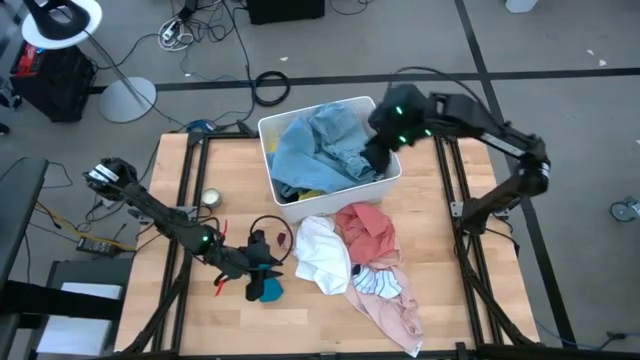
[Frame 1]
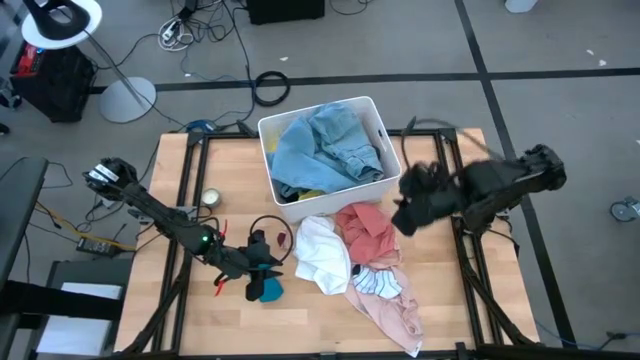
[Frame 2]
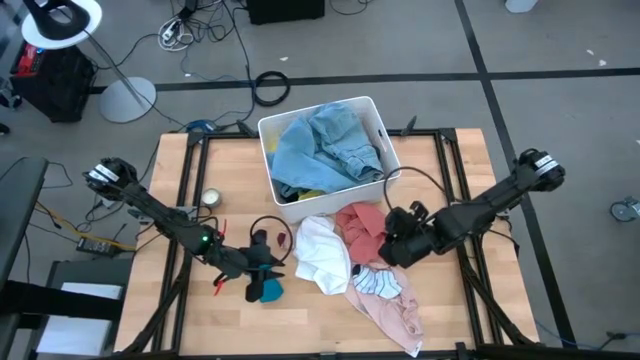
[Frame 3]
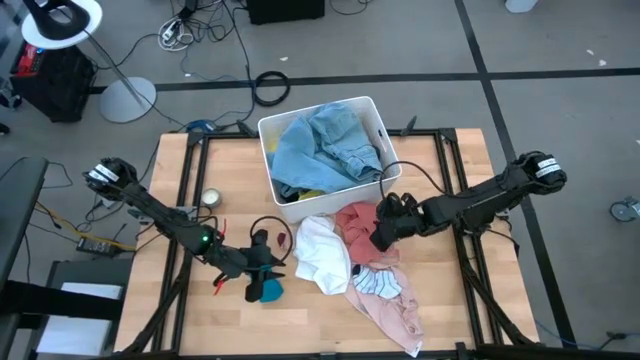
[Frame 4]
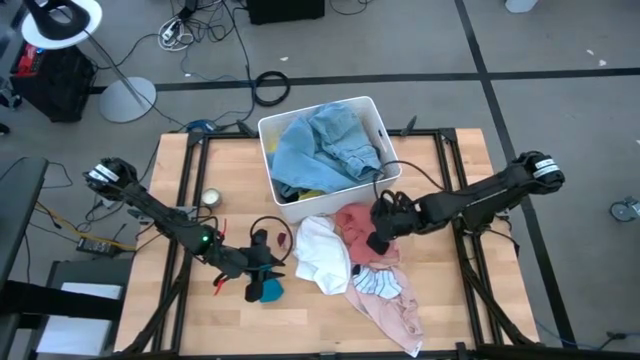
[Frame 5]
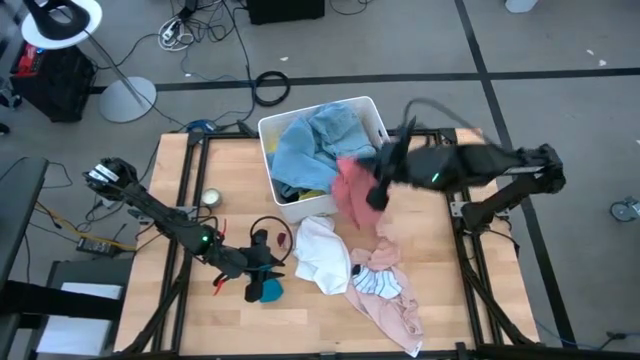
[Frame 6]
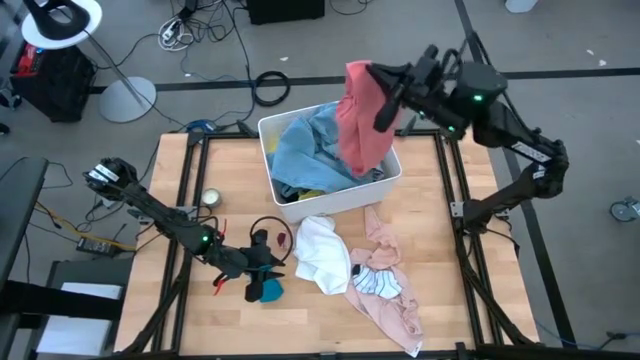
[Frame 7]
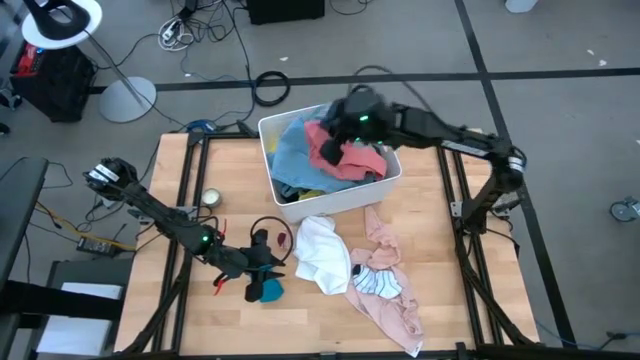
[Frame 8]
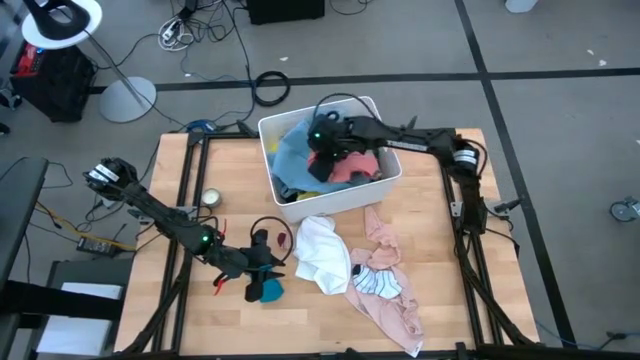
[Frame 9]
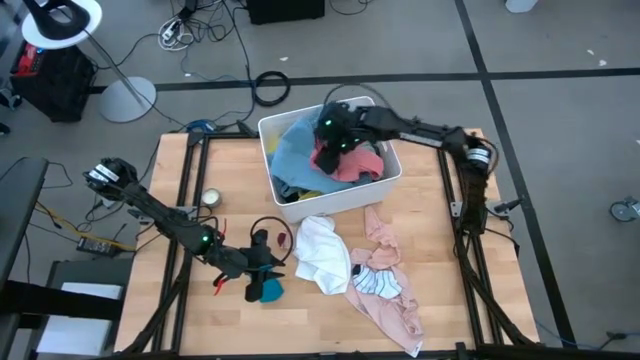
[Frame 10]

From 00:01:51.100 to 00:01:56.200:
Task: Sort clothes
Put the orange underwear into the white bin

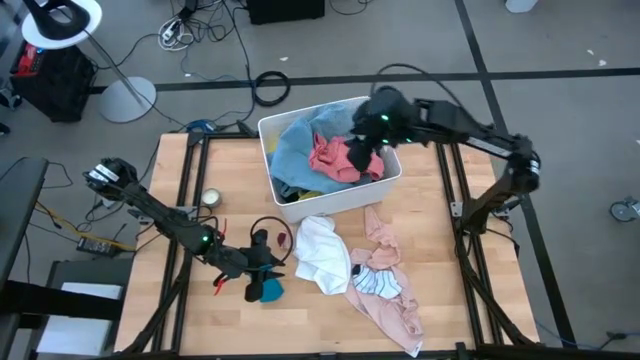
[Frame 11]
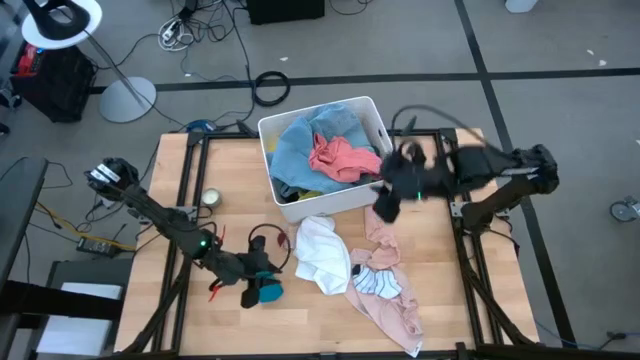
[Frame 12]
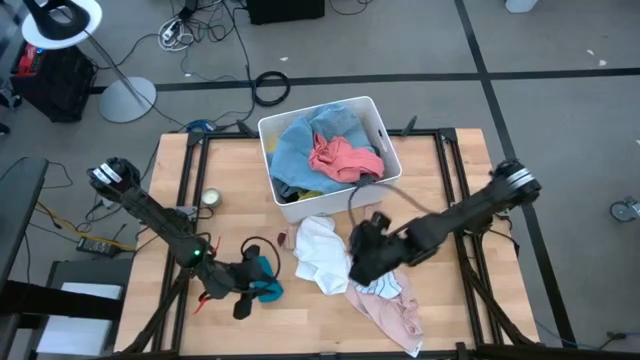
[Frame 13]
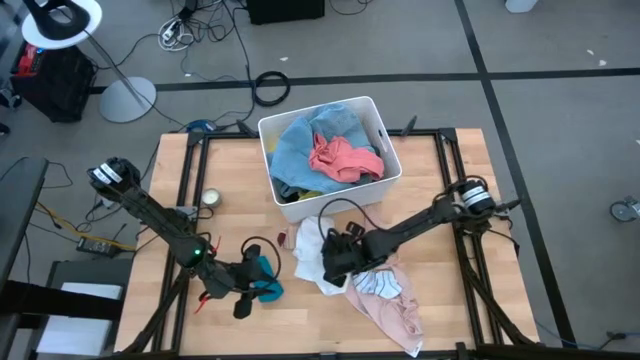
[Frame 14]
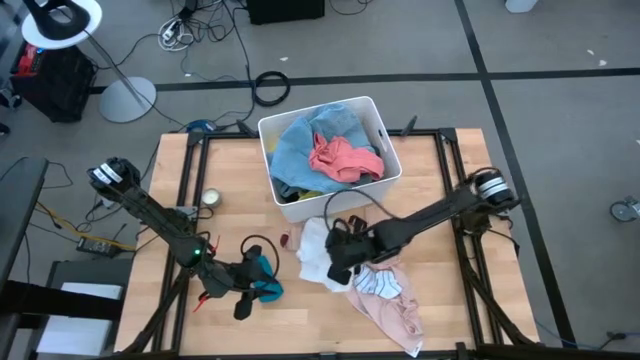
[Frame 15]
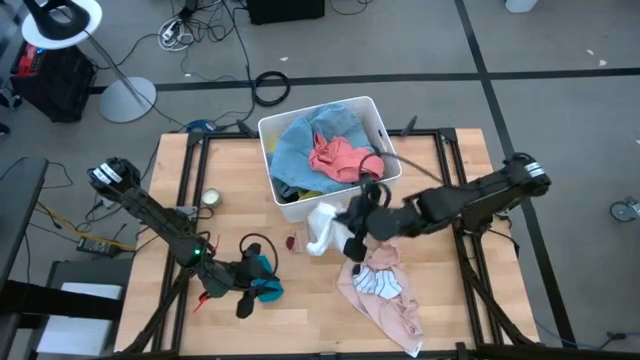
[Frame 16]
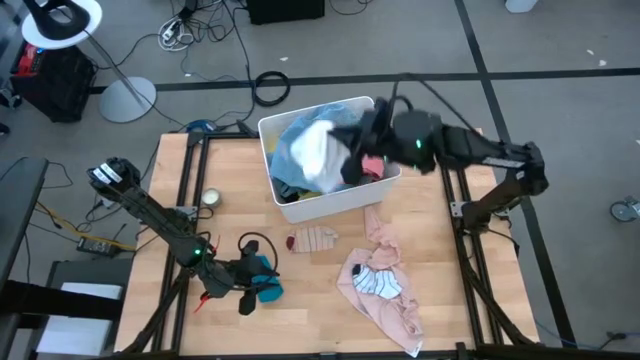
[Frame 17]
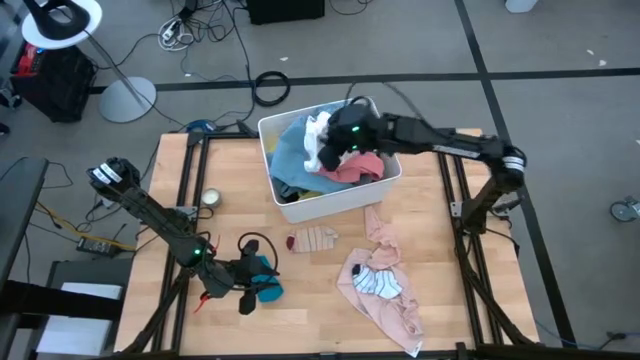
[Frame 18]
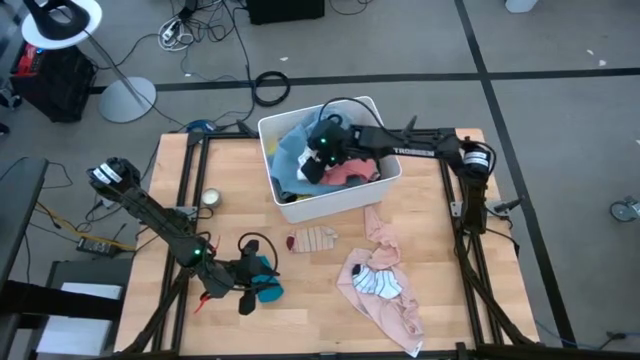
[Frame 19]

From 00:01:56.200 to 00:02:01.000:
Put the white underwear into the white bin

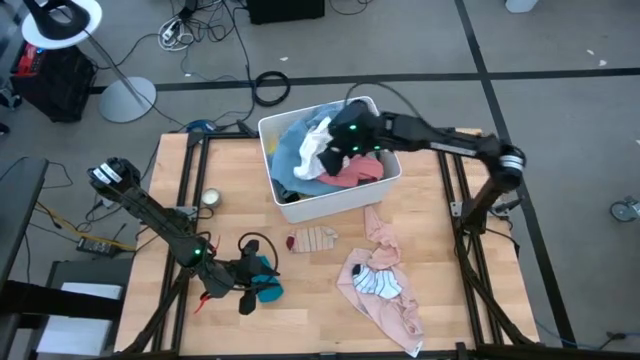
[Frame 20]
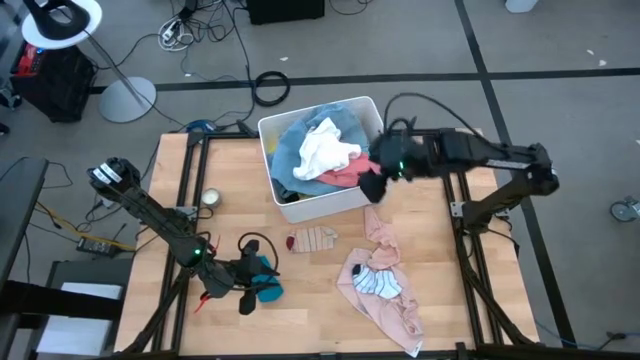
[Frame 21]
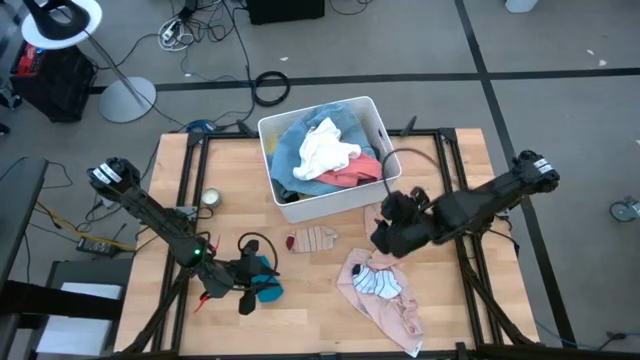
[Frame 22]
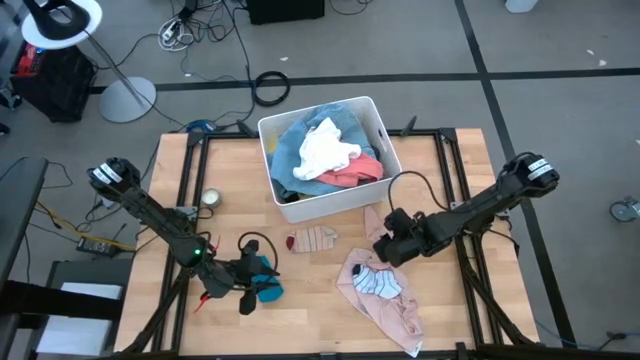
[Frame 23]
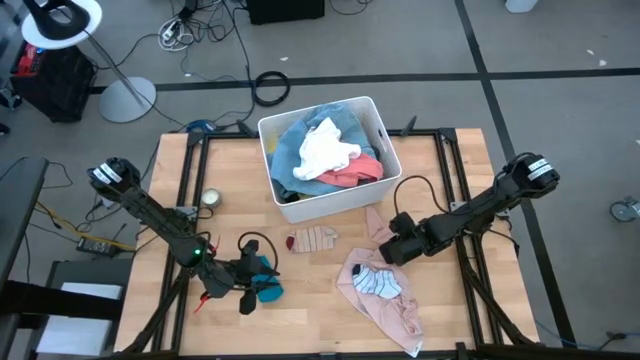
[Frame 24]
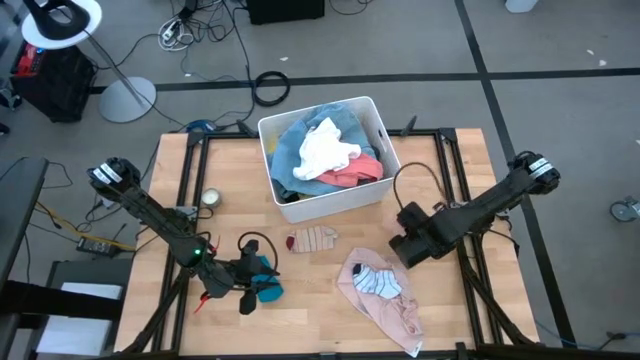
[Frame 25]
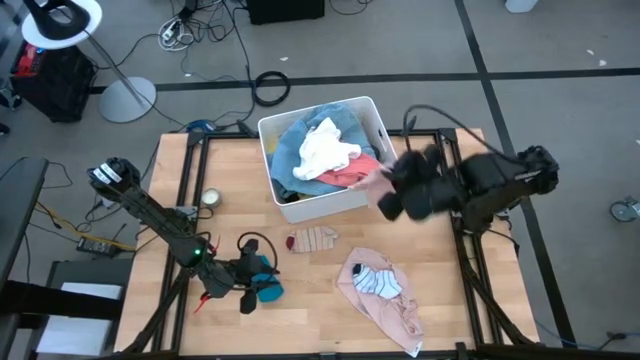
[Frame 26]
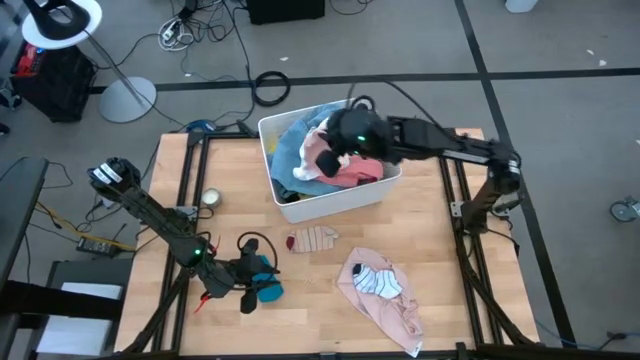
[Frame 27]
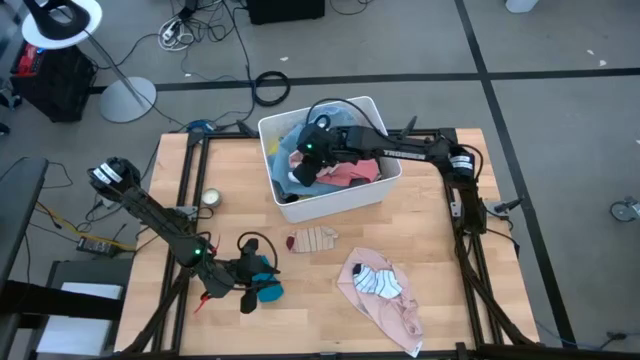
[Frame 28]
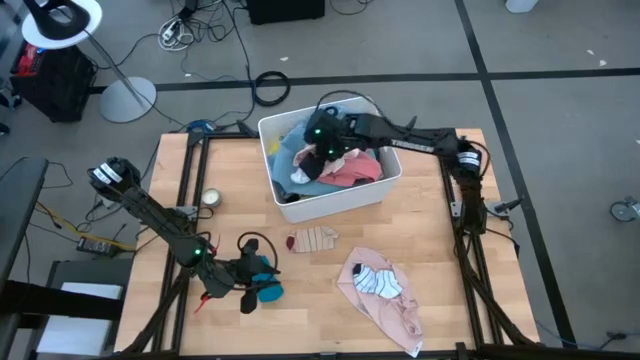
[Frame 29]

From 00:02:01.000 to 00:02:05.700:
Put the pink sock into the white bin

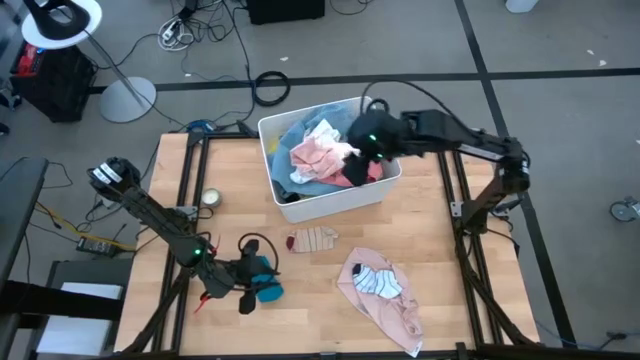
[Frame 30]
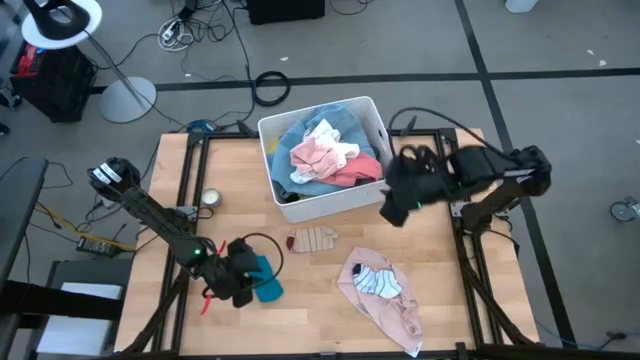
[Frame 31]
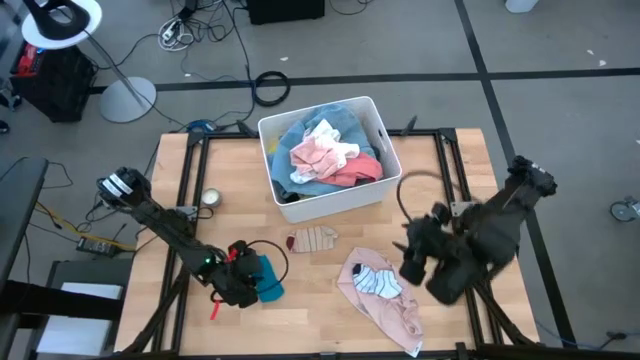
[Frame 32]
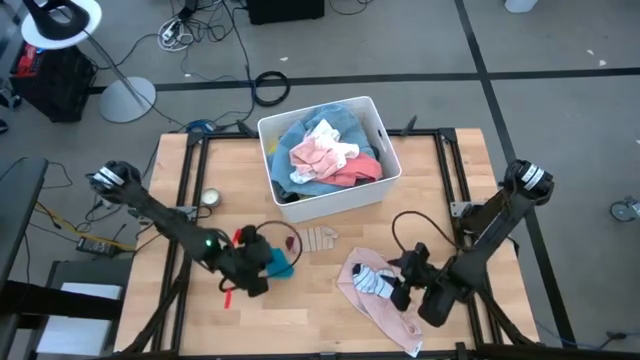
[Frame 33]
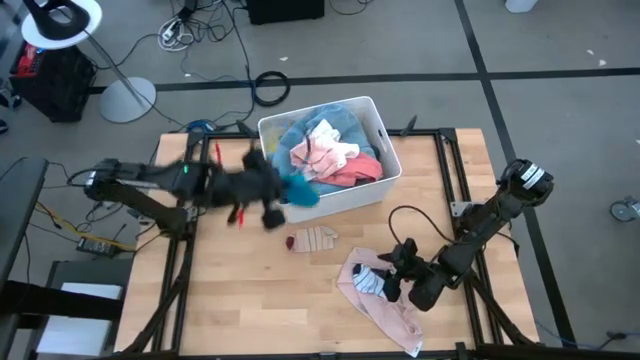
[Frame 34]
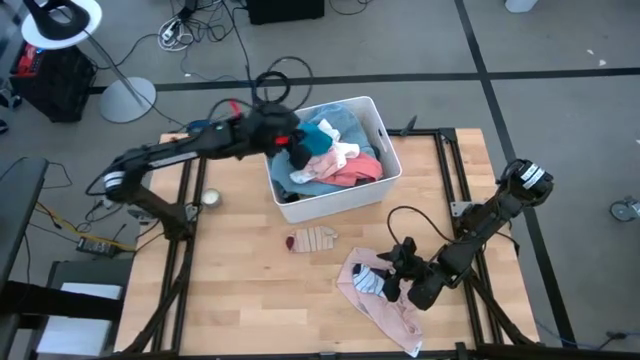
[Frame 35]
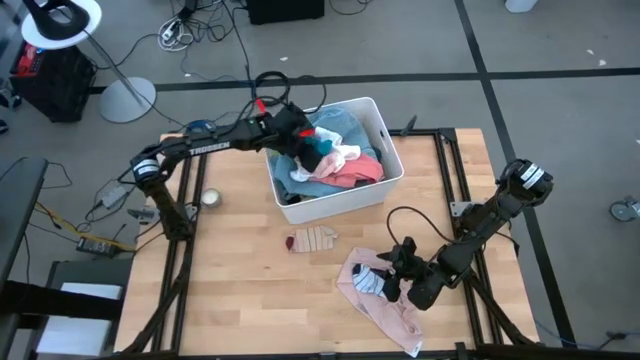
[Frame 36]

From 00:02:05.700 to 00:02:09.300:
Put the blue sock into the white bin

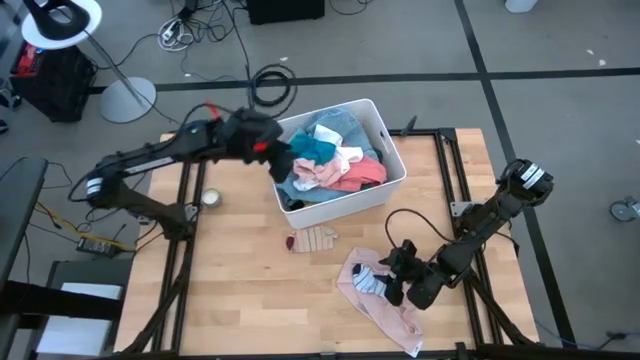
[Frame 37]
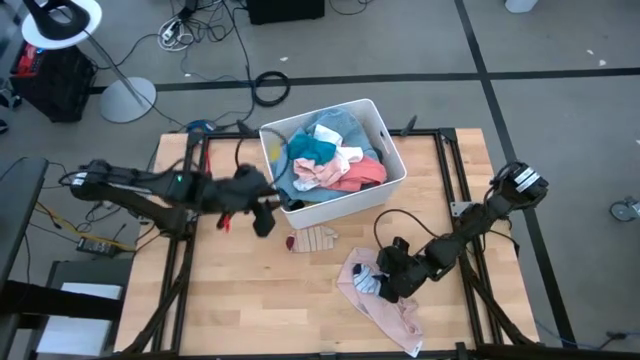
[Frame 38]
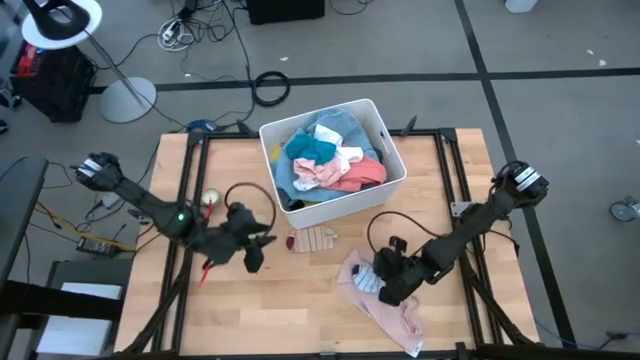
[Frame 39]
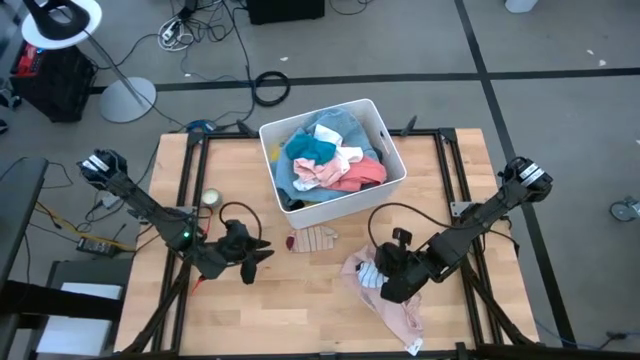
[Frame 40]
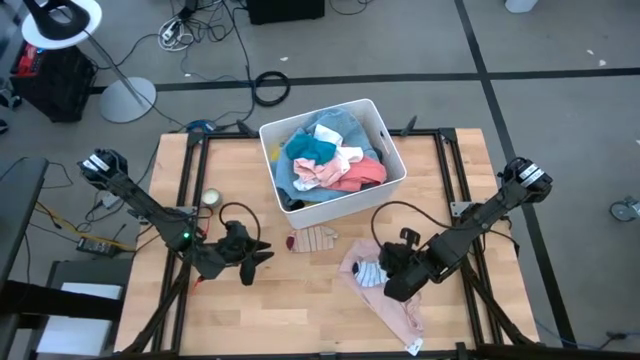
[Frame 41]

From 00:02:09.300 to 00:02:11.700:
Put the white striped sock into the white bin

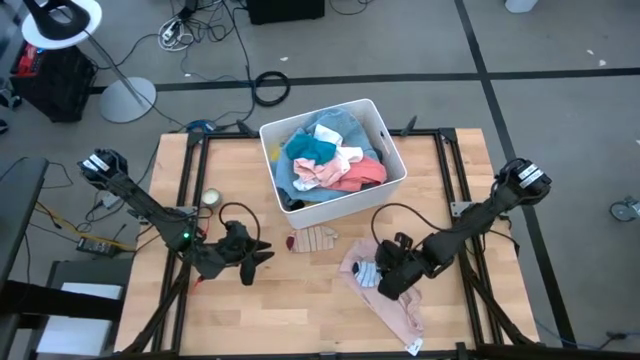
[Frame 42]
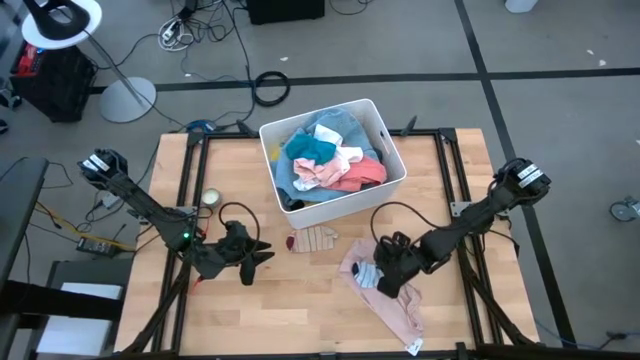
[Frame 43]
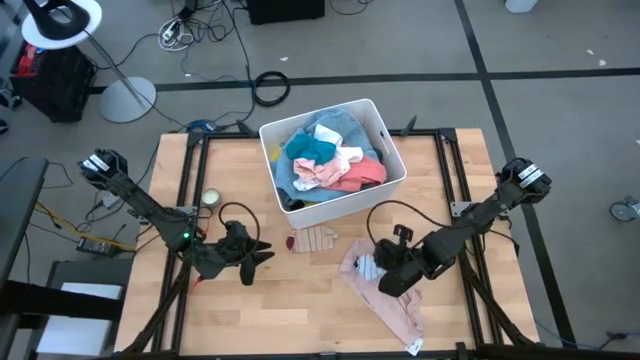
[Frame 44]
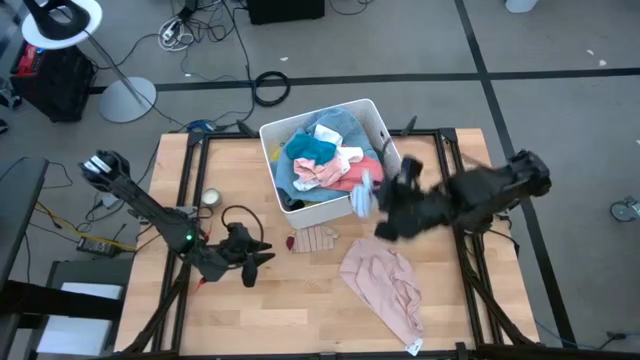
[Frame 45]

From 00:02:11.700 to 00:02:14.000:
Put the white striped sock into the white bin
